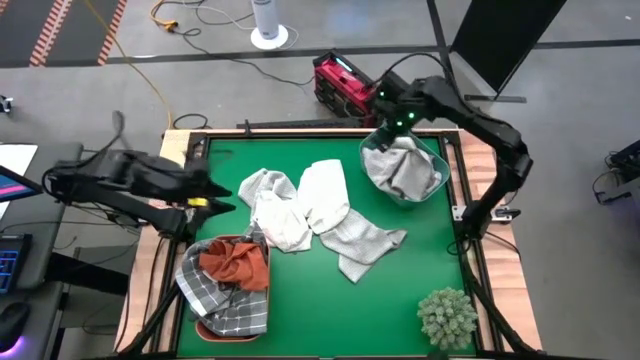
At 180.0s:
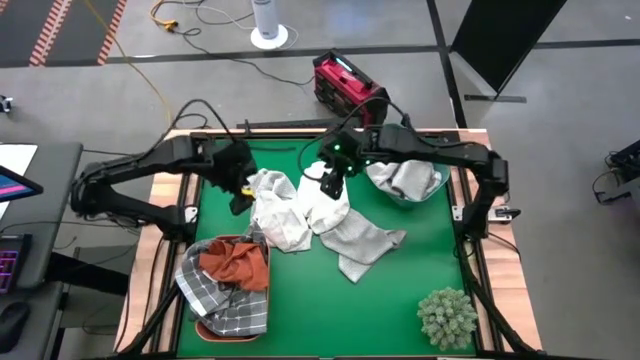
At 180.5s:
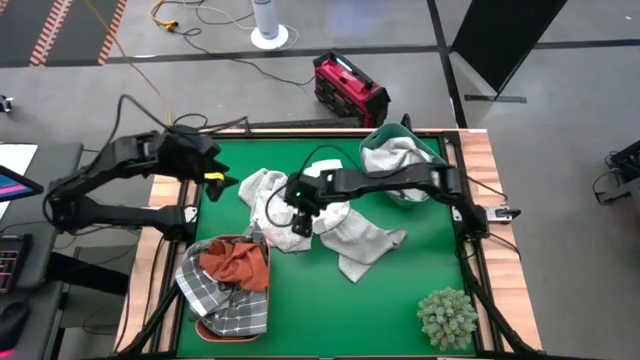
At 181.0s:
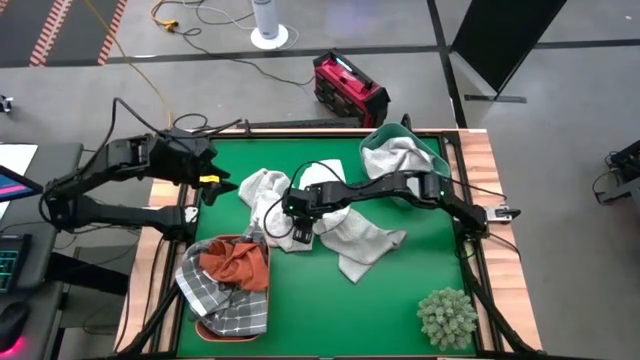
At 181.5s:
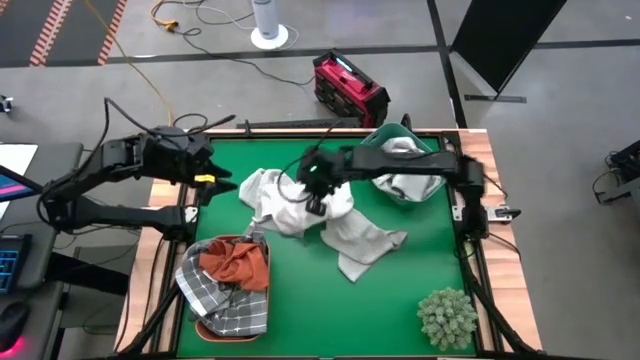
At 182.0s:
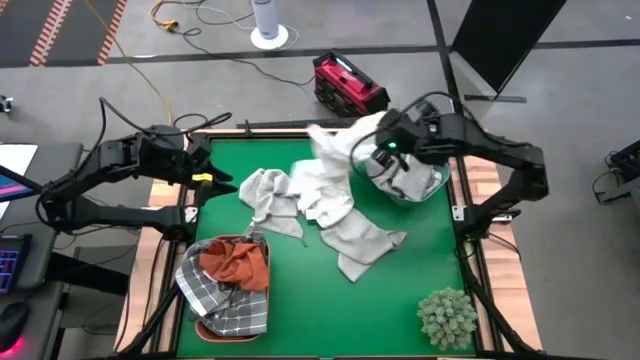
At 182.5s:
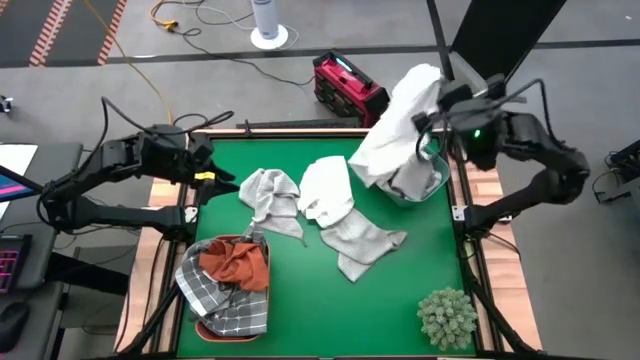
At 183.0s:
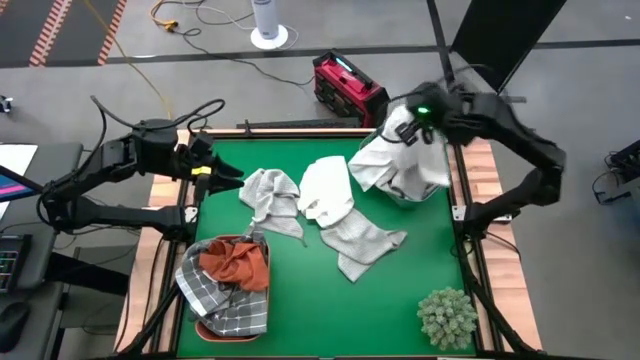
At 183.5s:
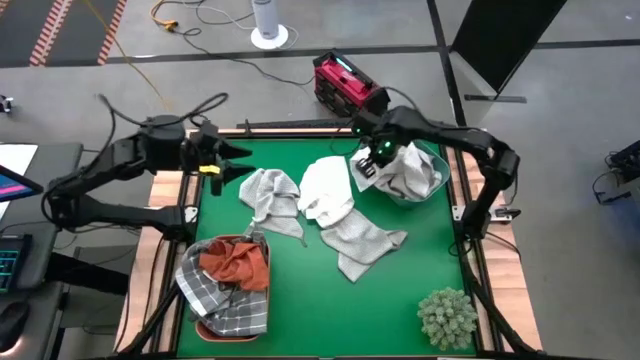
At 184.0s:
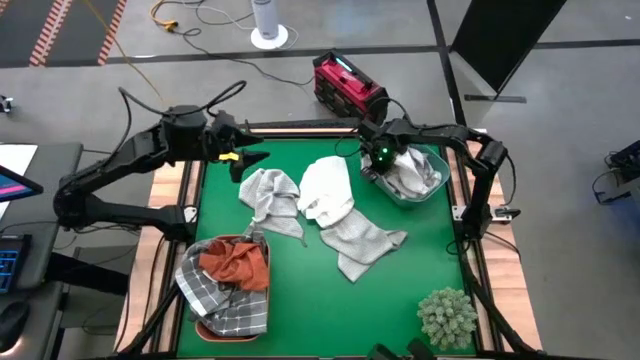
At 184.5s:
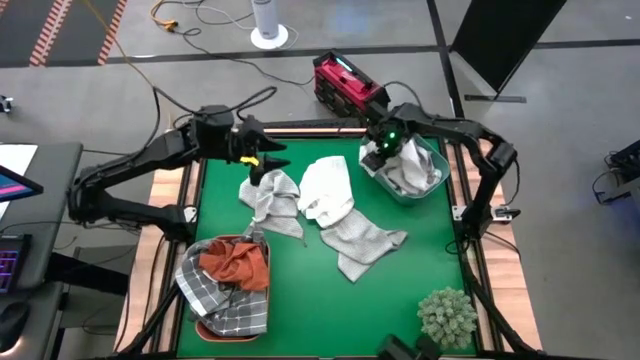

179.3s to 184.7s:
Task: Sort towels by color in basket
Put the white towel into the green bin

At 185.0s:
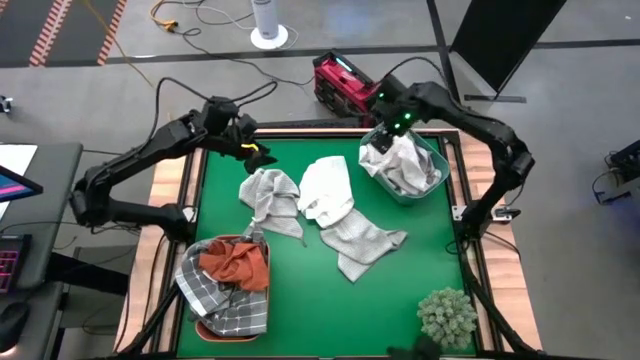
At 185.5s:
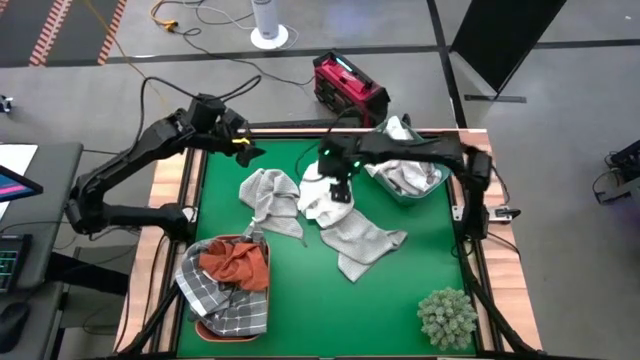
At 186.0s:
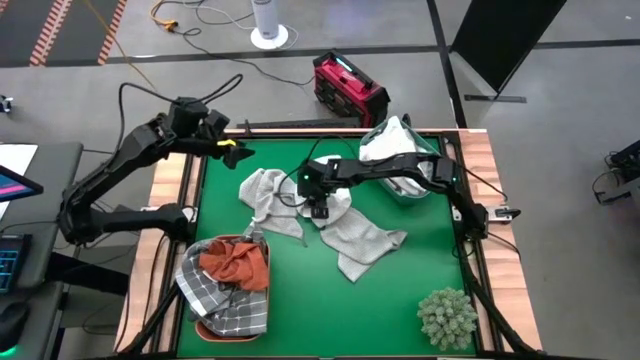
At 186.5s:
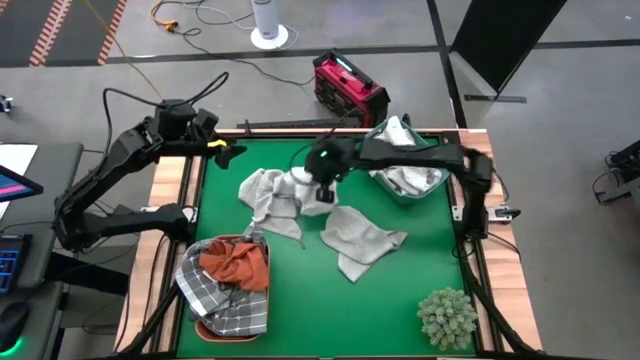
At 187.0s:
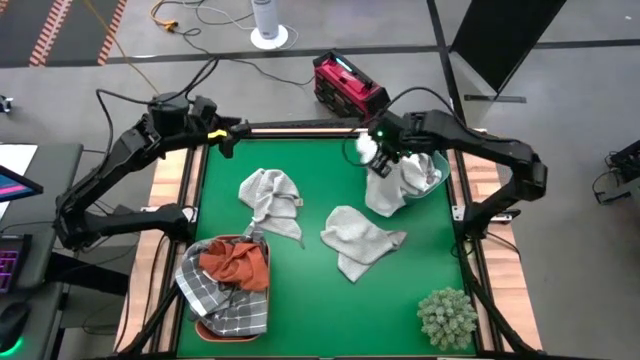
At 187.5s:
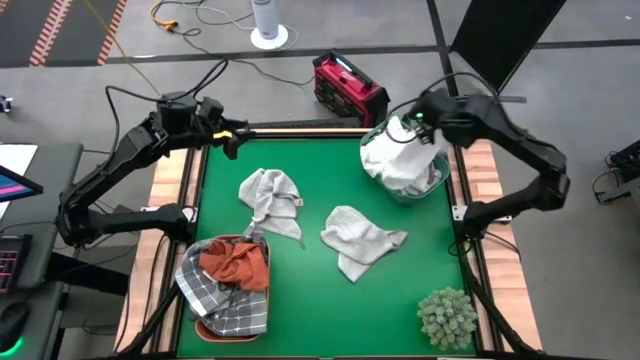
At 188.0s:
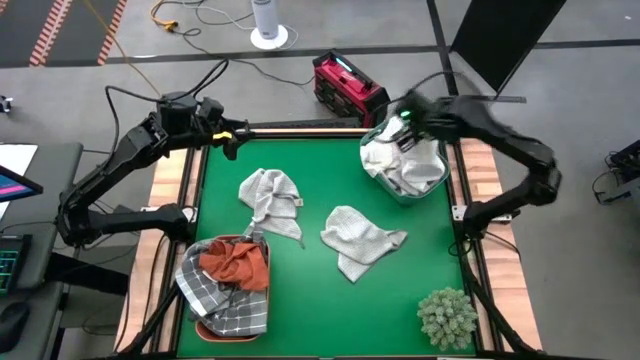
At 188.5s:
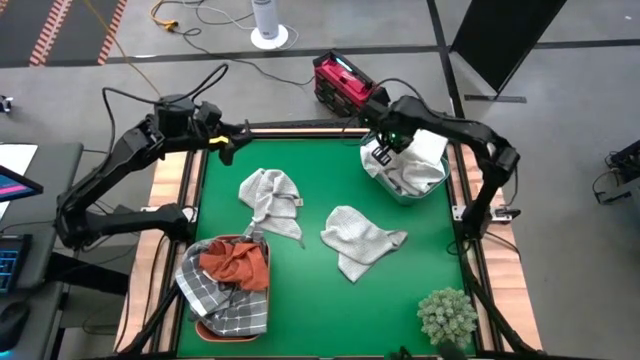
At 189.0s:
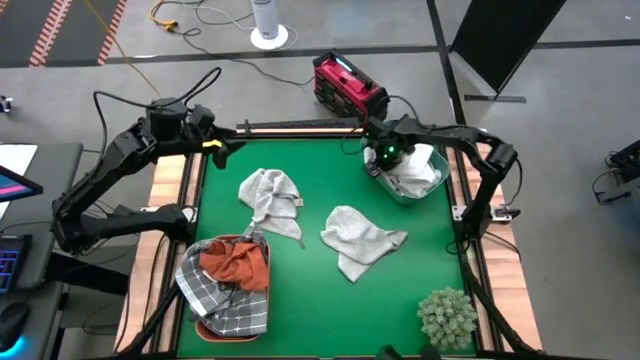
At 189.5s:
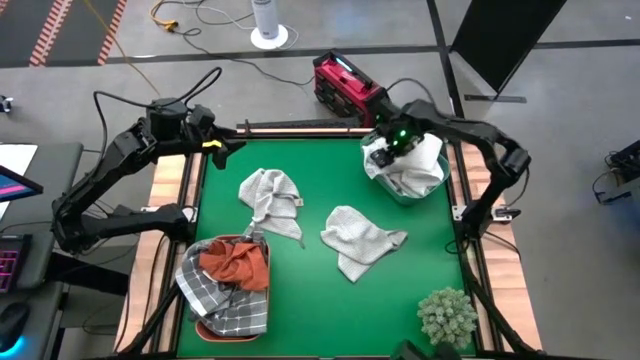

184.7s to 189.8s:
Put the white towel into the green bin

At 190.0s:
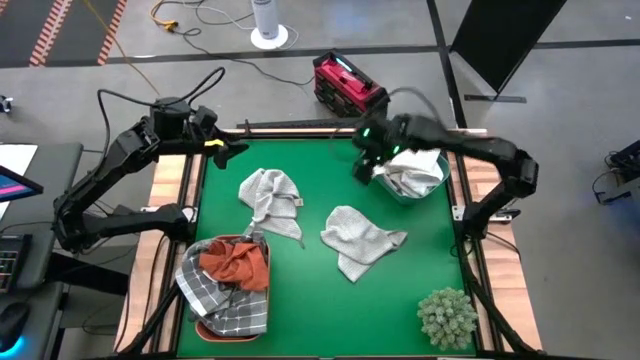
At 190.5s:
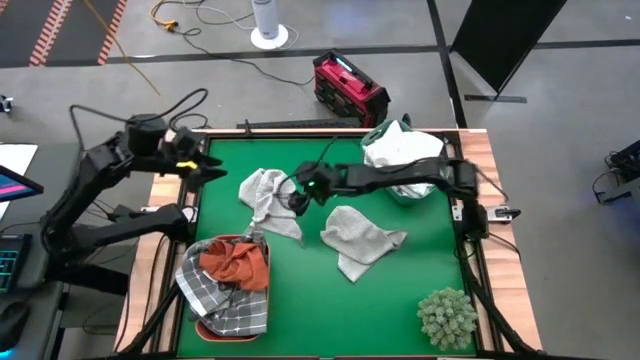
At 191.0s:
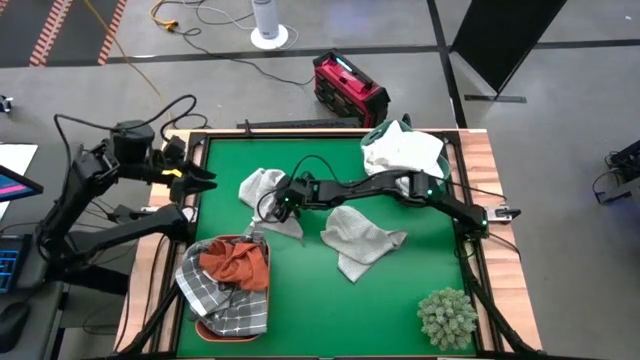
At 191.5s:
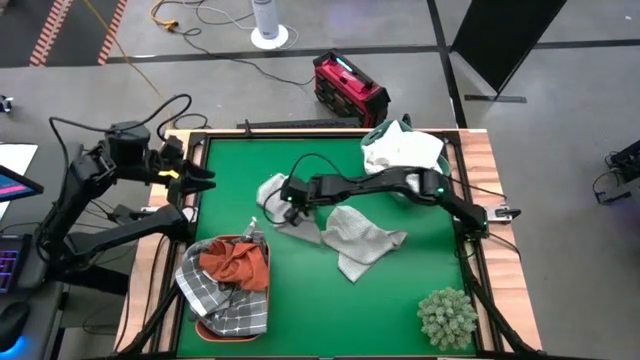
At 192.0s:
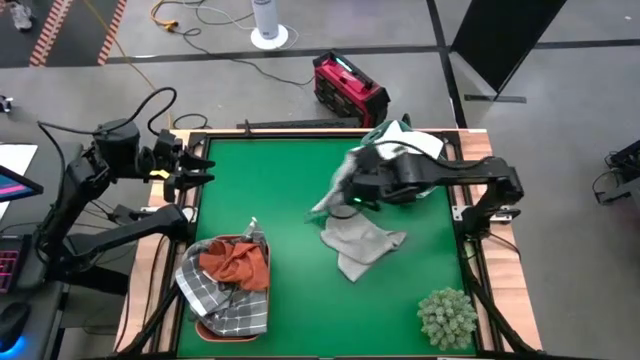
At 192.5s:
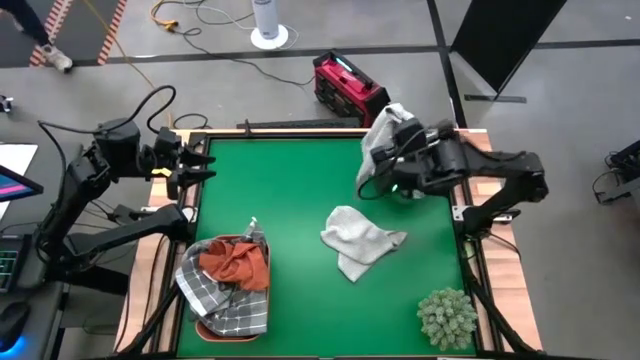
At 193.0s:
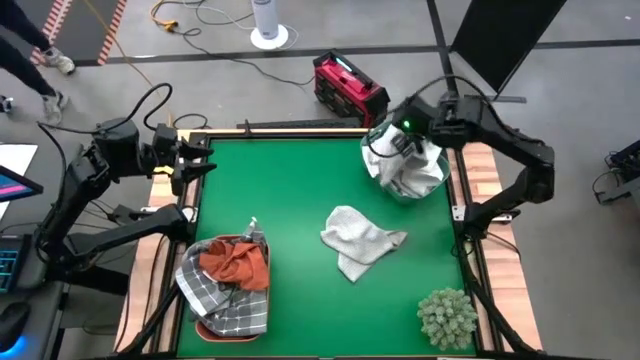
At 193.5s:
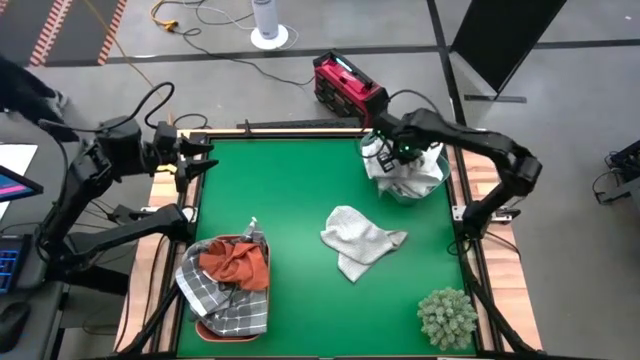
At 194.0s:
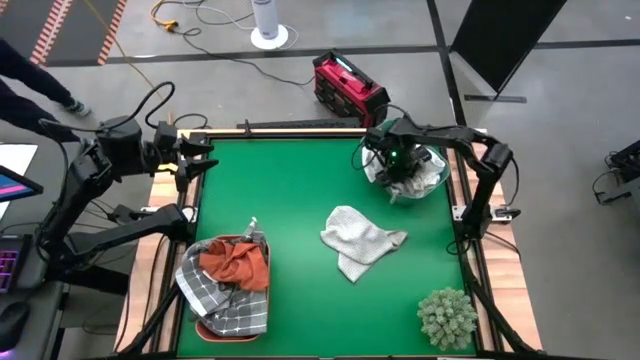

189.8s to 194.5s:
Put the left light gray towel into the green bin

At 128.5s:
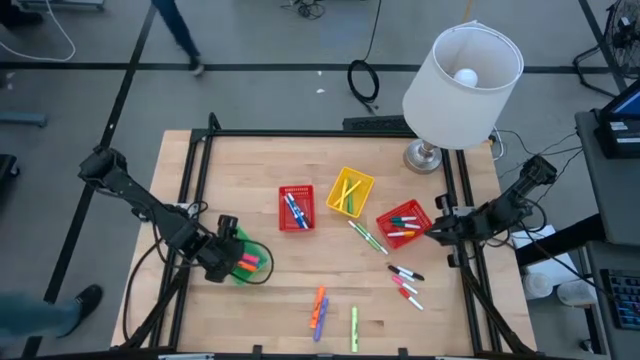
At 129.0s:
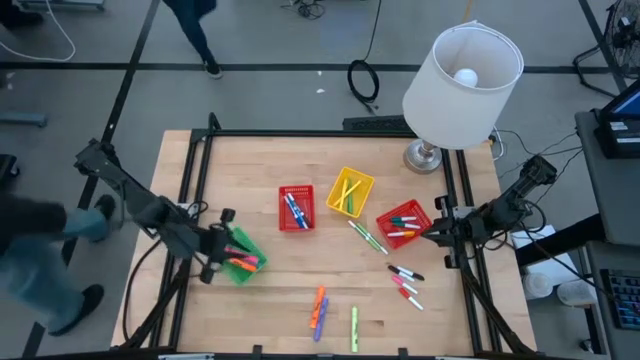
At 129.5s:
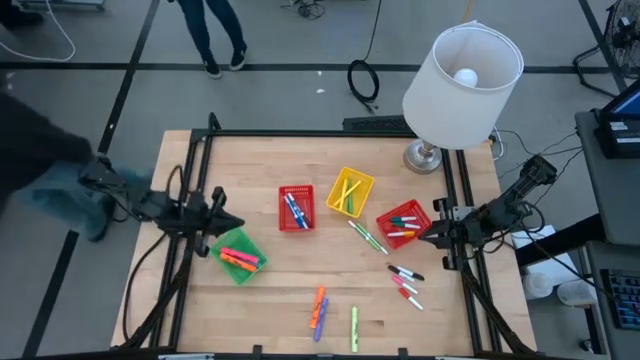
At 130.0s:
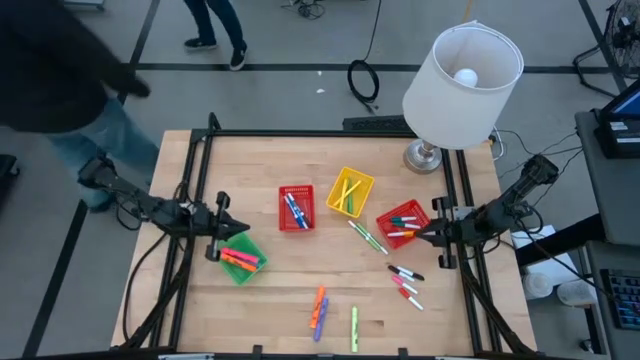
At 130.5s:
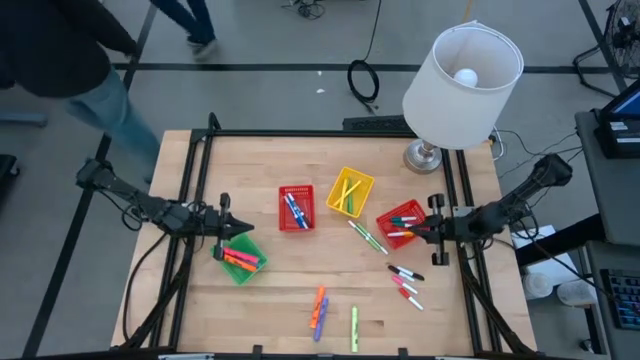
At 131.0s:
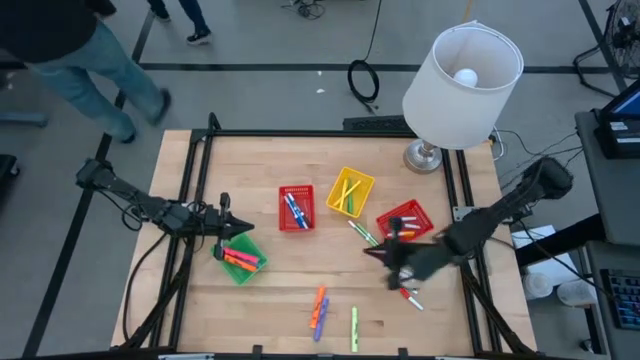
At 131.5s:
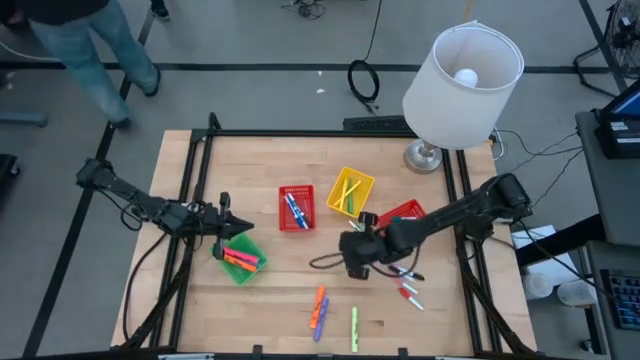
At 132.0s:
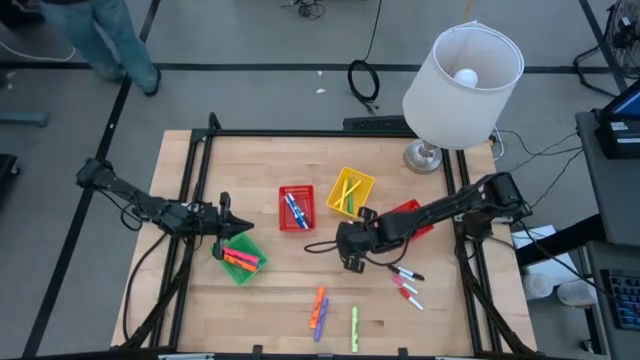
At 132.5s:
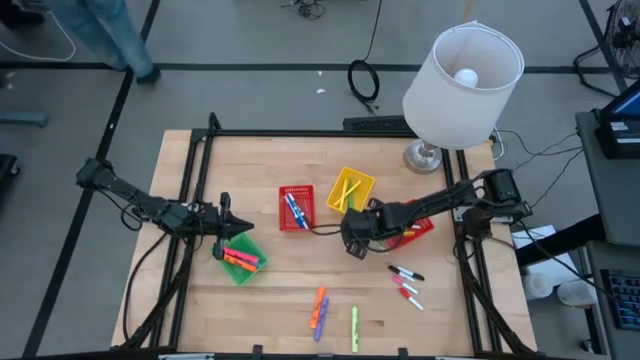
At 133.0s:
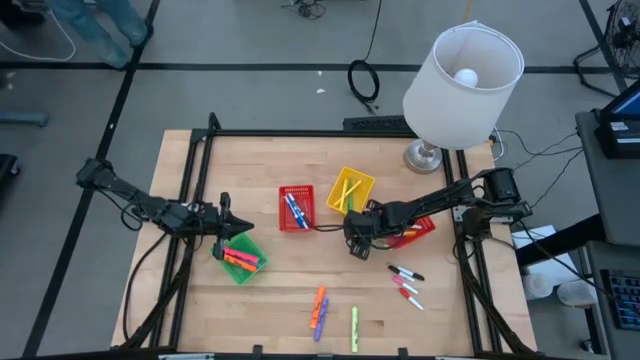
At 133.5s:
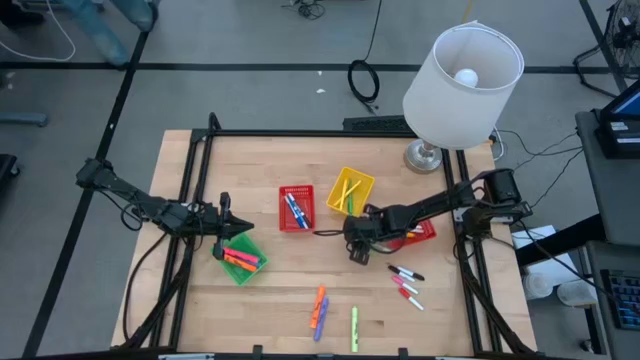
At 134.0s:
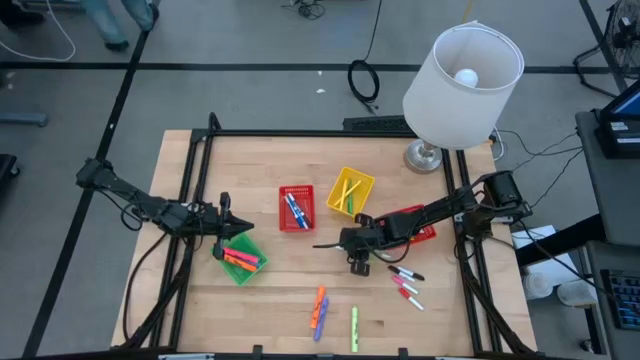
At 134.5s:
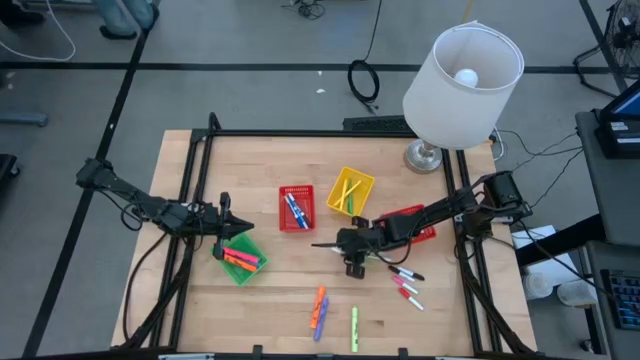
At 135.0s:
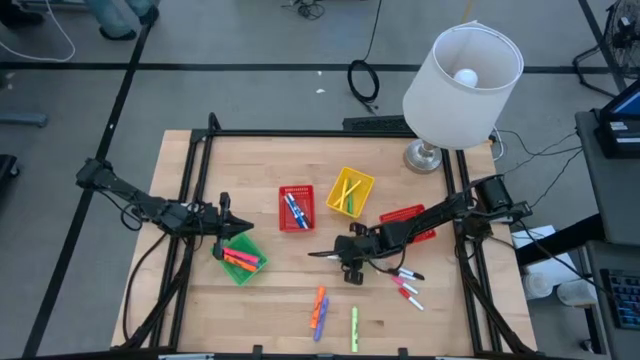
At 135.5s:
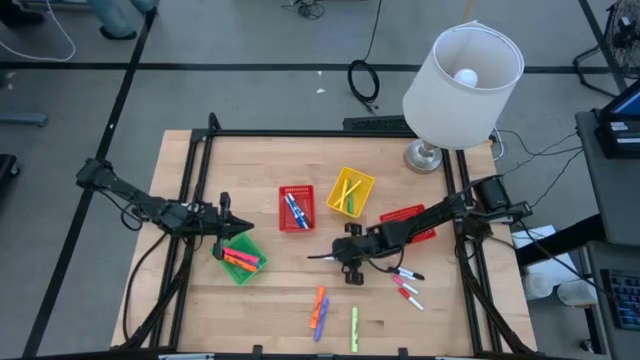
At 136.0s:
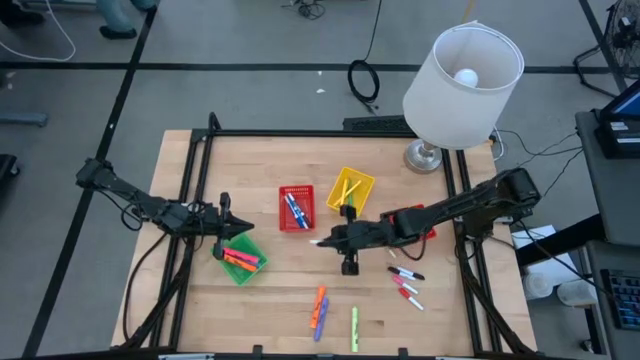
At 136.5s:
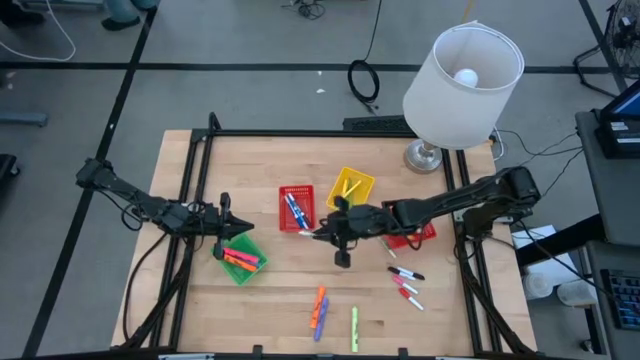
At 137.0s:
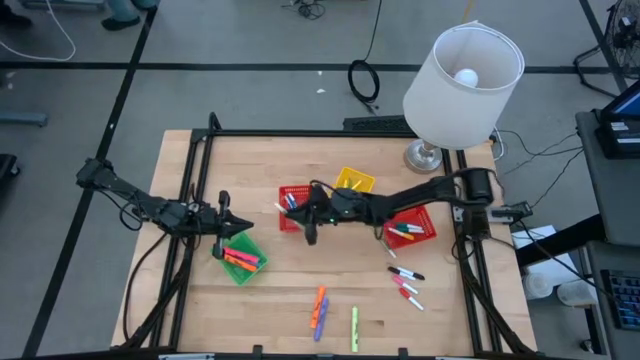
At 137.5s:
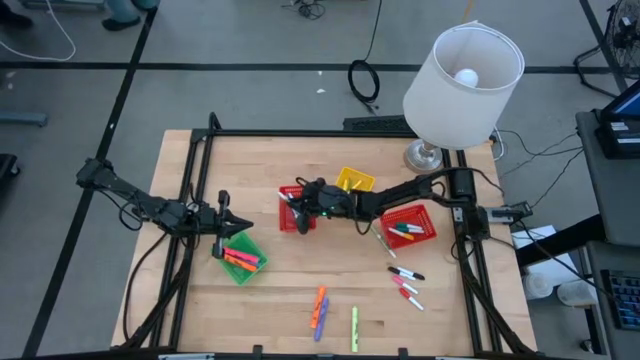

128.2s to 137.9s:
Task: Pick & Place Markers
Put the green marker pen into the left red bin
